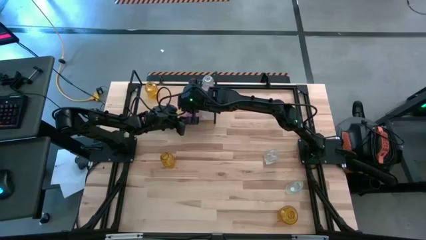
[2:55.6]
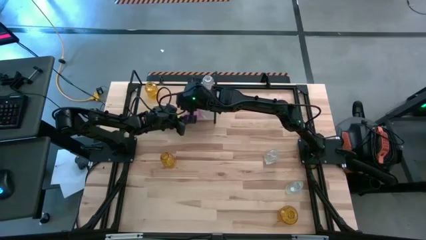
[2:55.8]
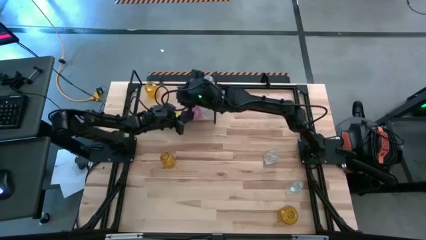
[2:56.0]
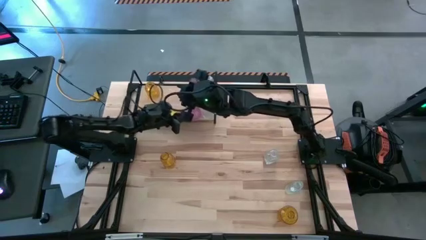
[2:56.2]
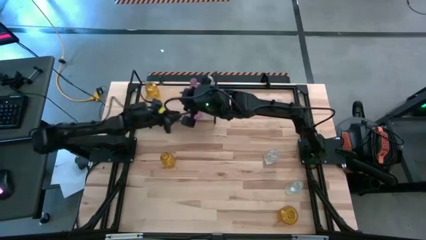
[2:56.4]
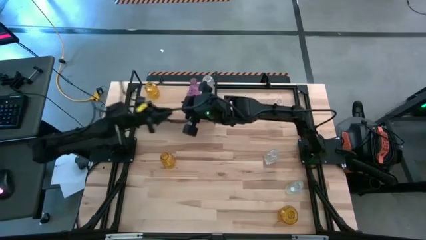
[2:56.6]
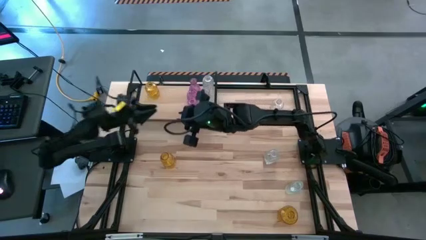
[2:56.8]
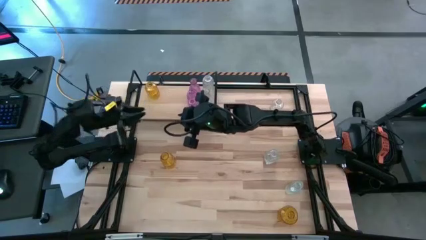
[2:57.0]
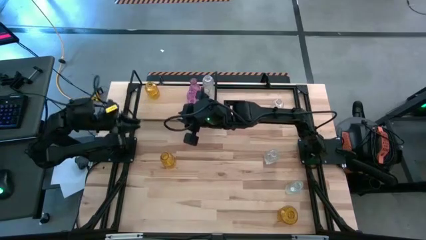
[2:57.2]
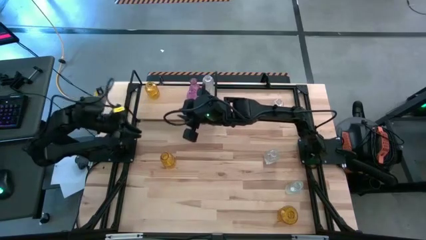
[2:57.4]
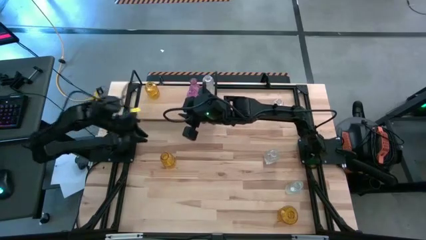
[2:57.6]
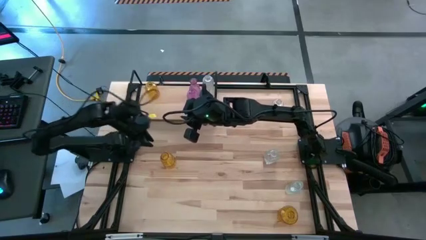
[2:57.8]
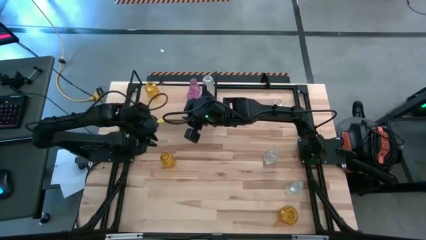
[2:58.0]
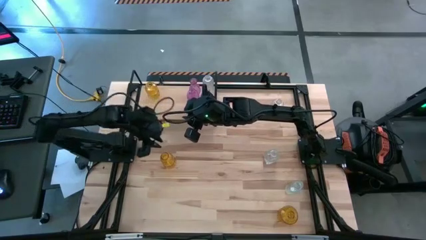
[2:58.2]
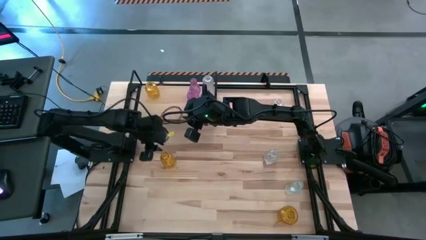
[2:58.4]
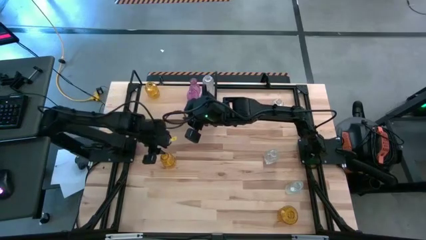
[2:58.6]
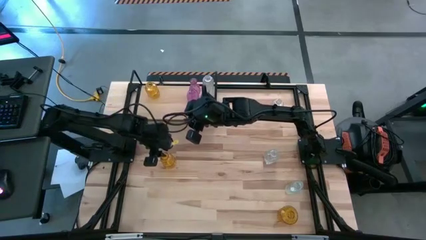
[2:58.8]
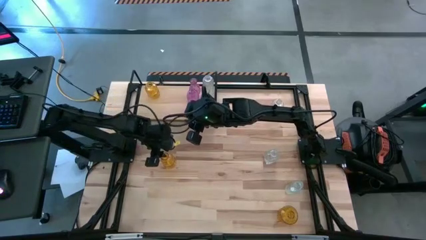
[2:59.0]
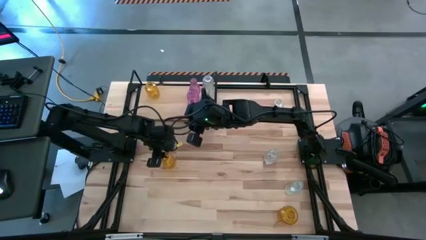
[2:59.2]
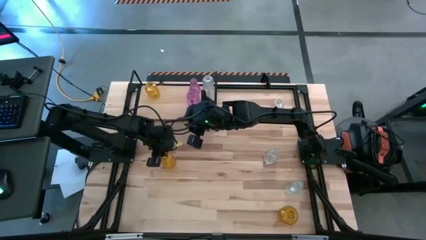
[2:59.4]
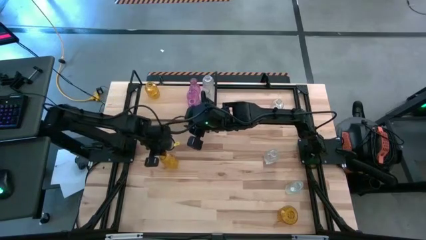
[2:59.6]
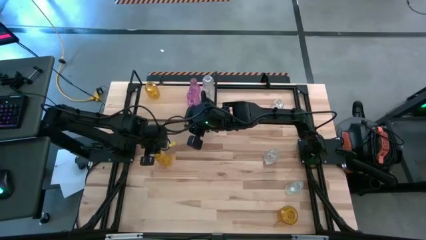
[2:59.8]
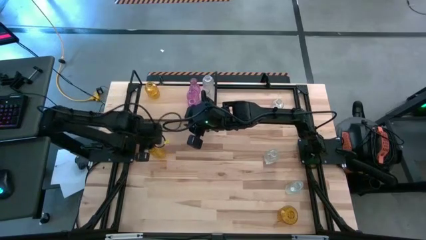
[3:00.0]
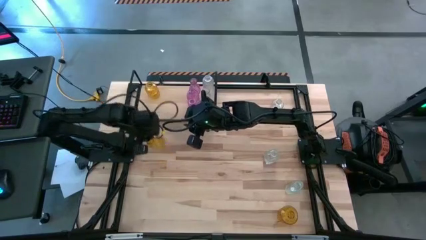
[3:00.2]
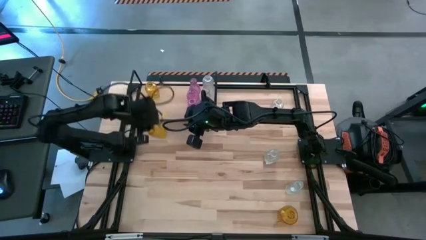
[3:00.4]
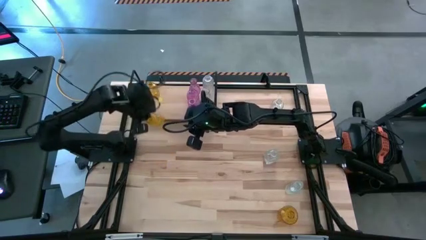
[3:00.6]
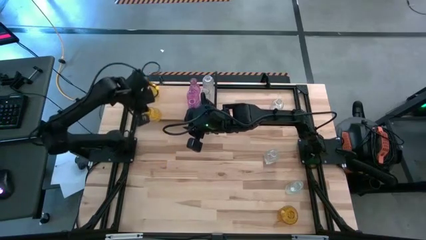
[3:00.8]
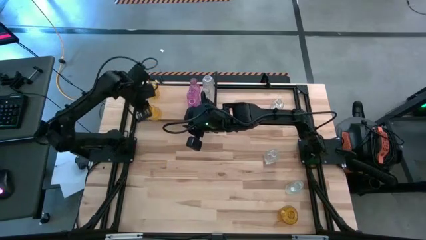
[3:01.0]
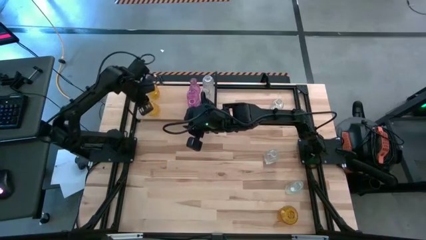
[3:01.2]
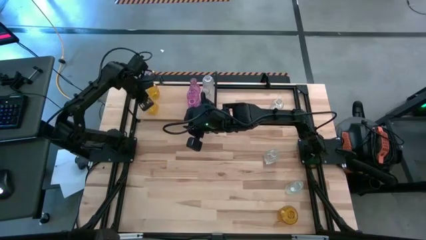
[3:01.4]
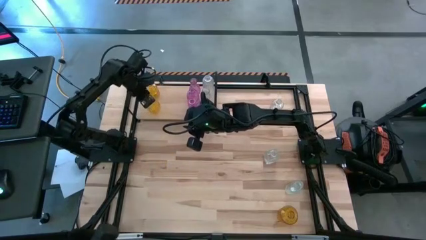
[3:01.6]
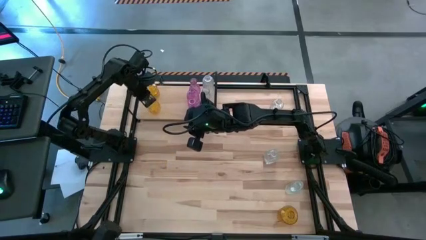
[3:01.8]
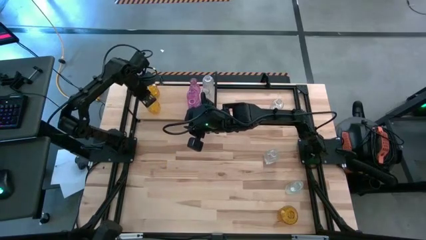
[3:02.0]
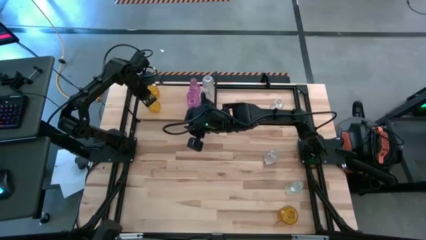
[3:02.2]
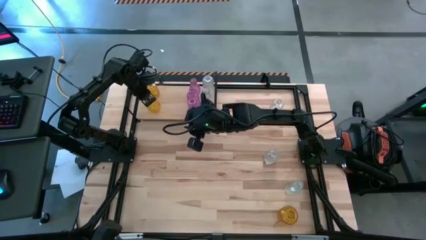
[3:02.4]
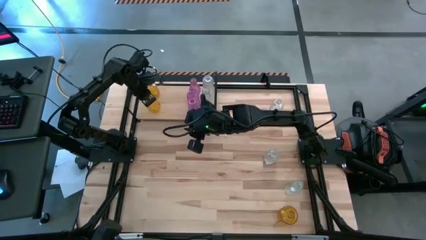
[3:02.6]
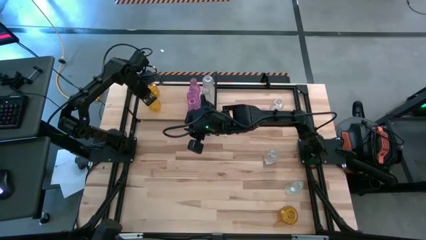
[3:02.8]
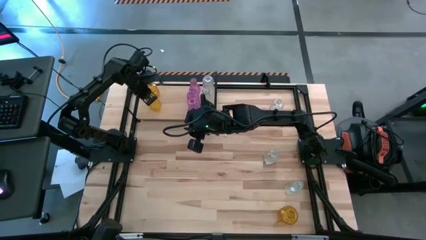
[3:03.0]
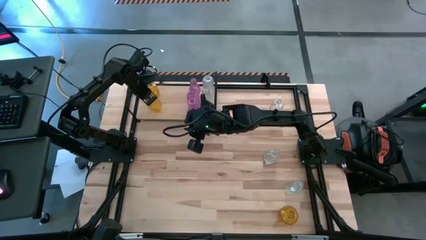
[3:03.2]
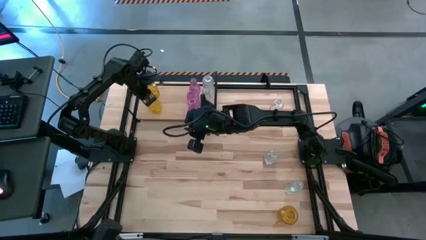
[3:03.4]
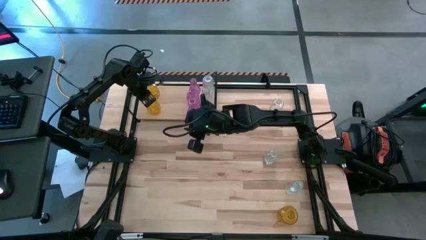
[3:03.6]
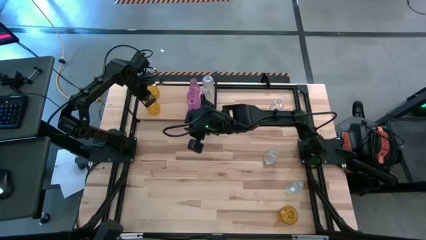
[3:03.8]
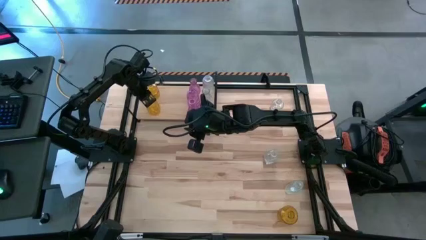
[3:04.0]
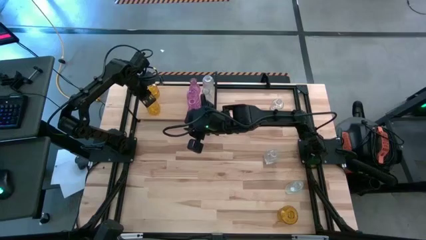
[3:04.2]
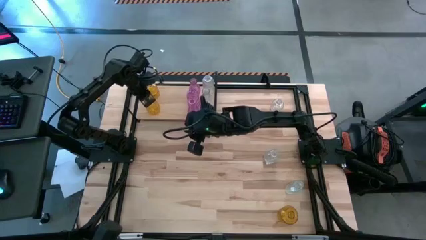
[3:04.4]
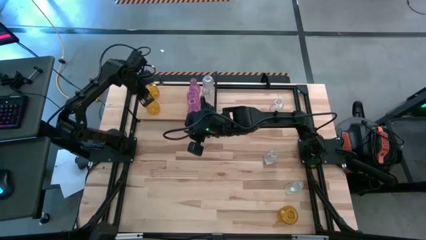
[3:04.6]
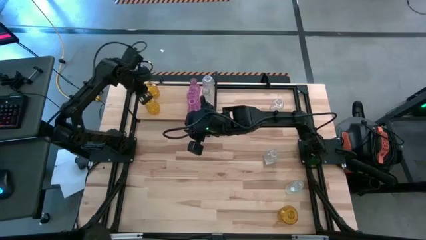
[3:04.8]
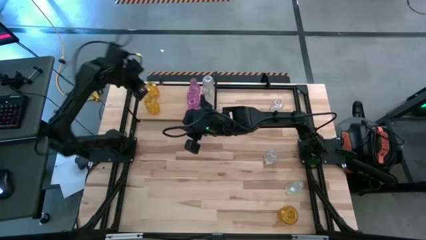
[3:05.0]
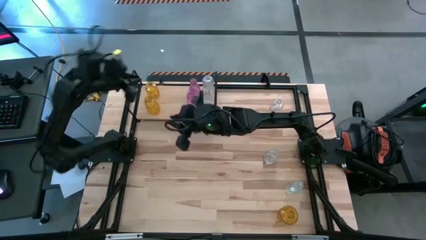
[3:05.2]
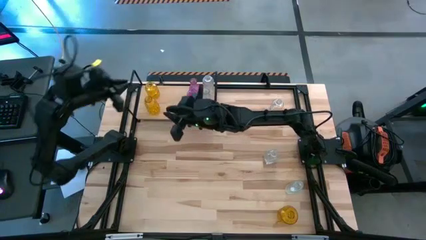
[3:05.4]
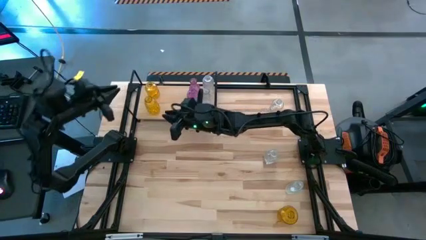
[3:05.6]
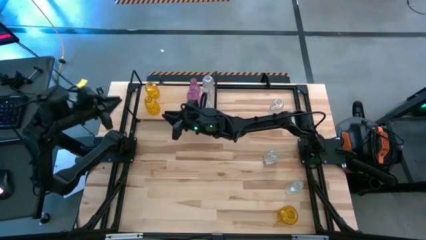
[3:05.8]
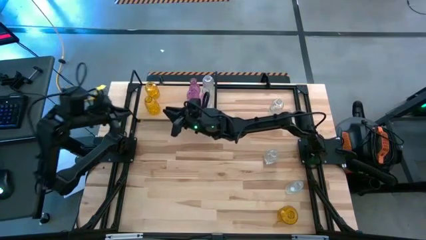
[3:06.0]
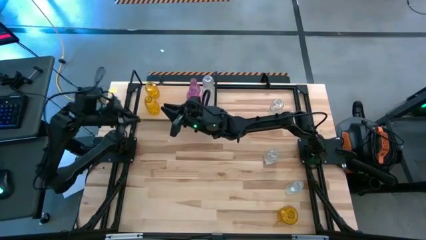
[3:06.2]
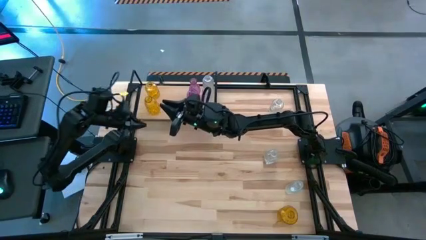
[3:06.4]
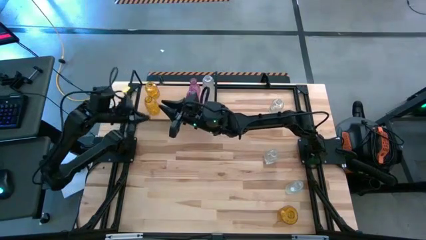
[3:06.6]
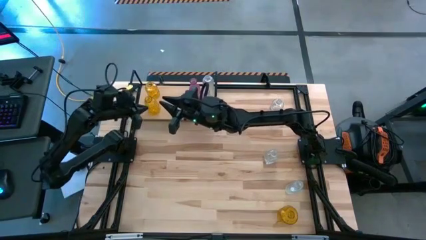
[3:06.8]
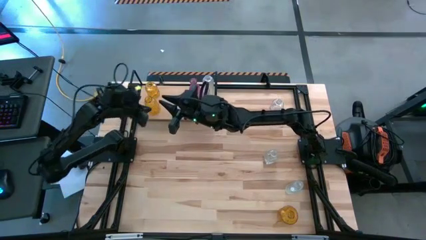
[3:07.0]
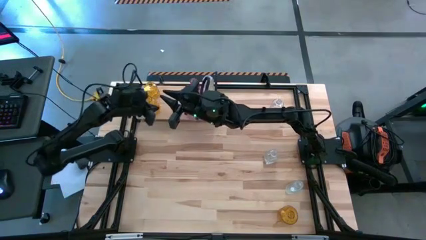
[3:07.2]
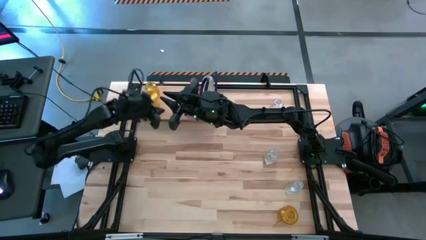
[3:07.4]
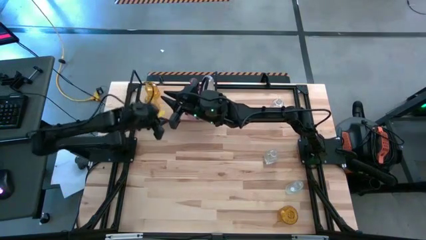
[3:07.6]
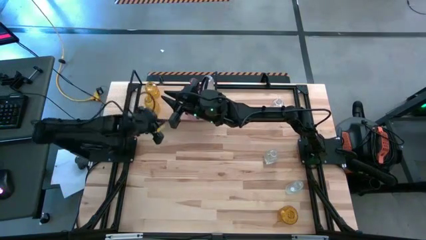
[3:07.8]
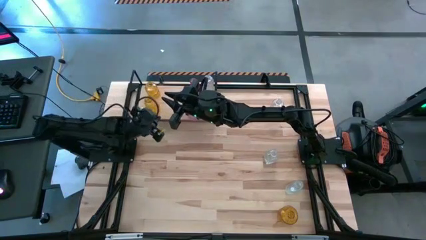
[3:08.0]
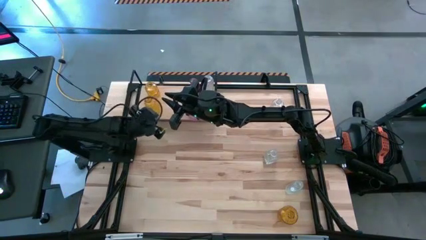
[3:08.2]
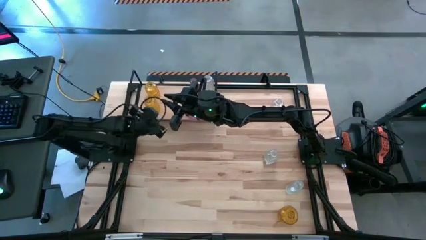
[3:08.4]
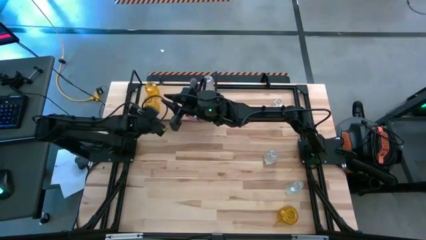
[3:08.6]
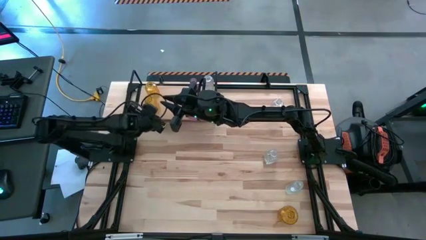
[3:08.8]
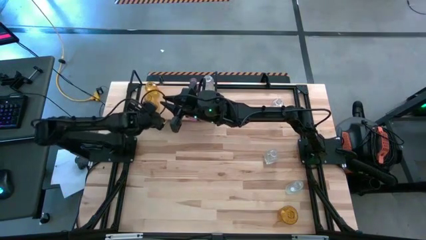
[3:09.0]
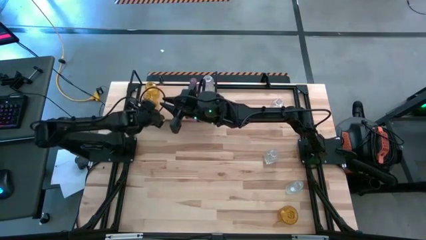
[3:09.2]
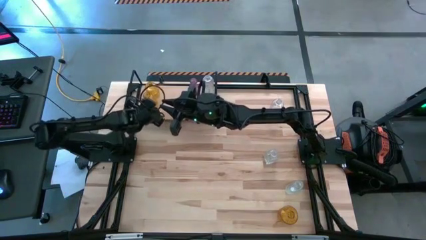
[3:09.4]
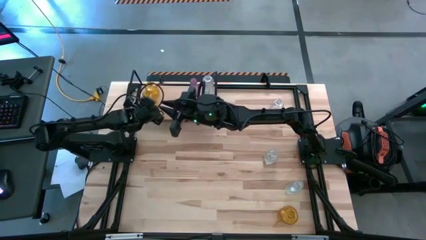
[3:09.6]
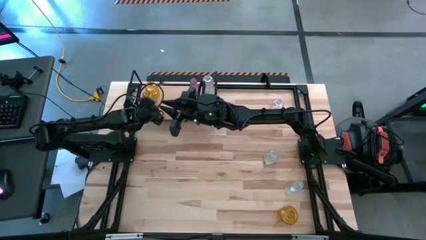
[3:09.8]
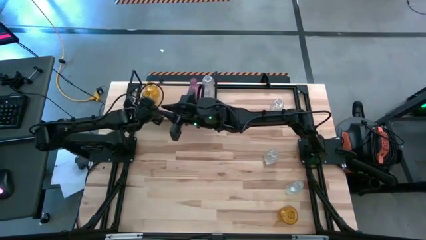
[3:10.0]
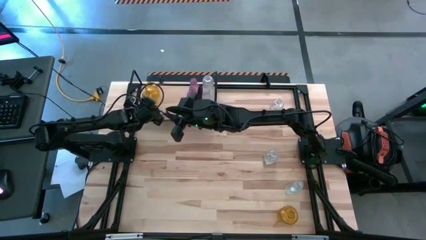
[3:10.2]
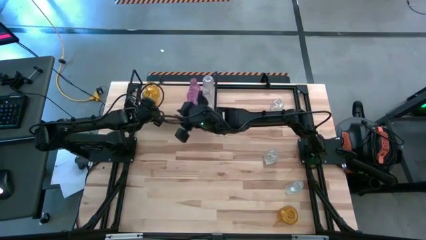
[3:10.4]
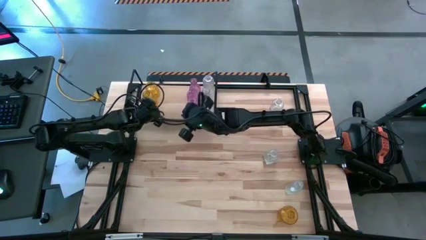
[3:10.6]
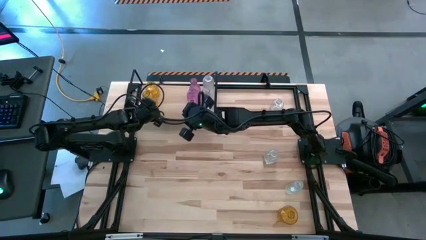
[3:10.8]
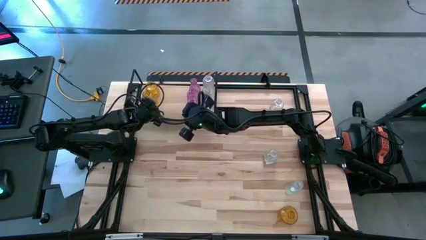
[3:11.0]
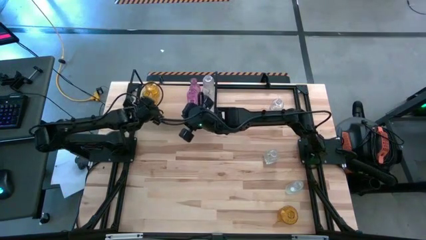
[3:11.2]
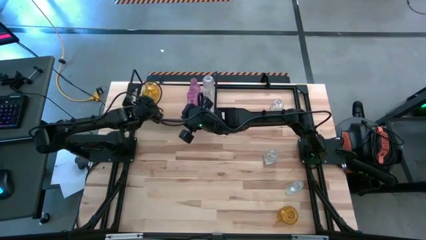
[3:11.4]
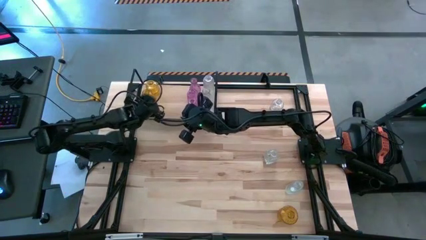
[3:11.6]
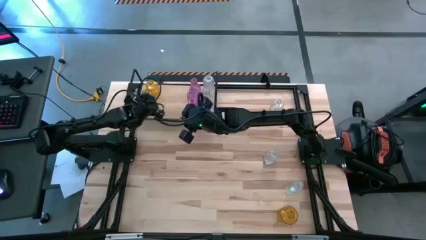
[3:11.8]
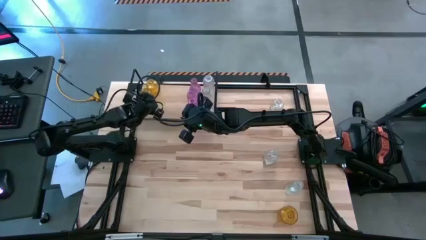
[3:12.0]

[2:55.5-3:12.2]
Task: sort vases onto shelf
Put the yellow vase on the shelf aligned with the other yellow vase

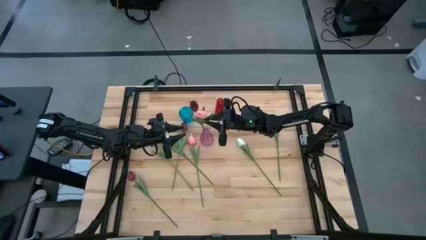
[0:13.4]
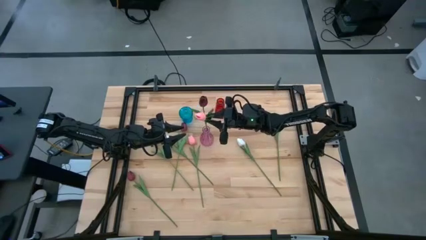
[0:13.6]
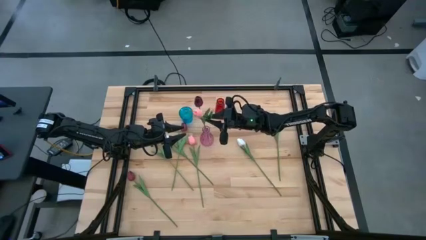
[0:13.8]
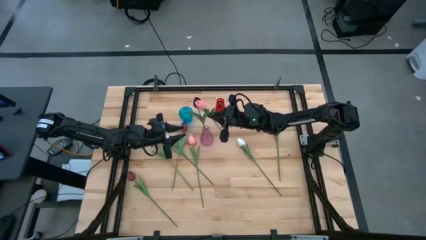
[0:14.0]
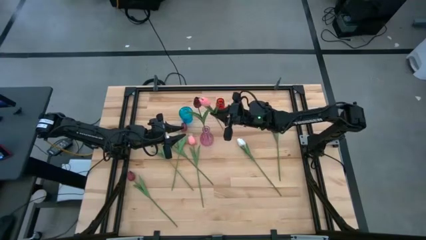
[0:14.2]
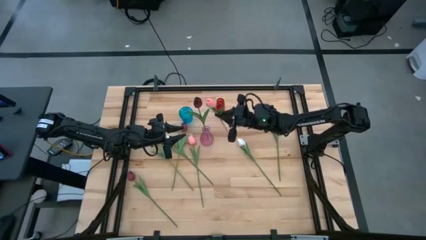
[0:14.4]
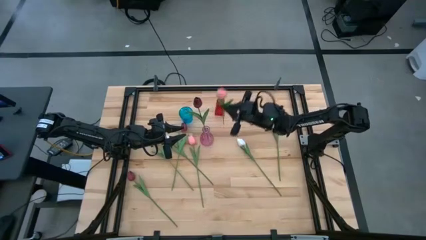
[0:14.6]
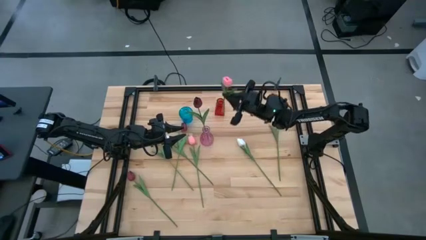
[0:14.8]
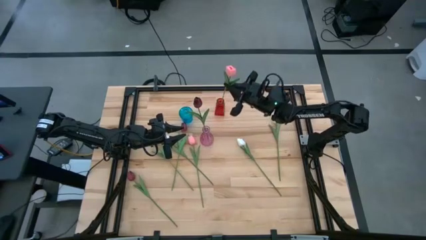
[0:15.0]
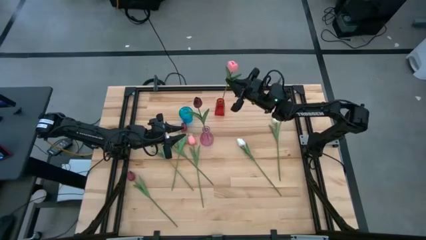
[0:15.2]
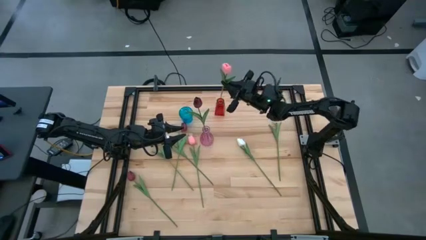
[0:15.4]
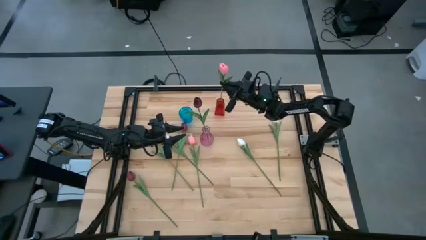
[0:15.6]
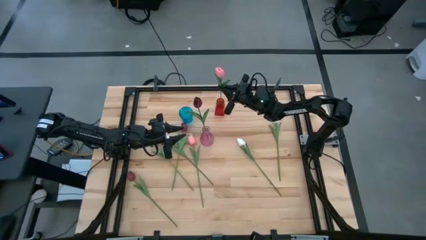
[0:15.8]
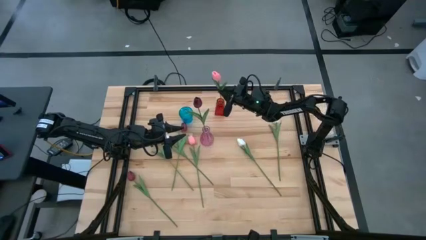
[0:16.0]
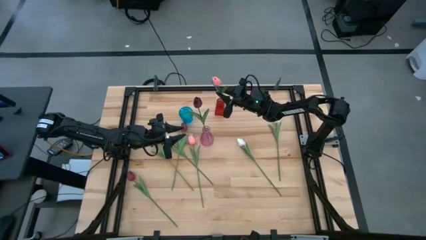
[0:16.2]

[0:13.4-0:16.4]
Task: Sort flowers into vase by color
Put the pink flower into the red vase
